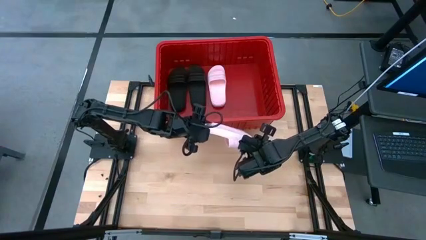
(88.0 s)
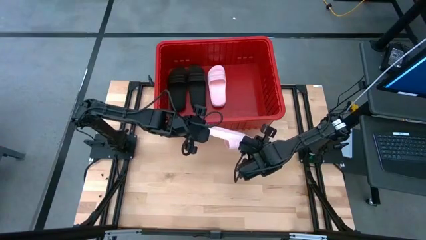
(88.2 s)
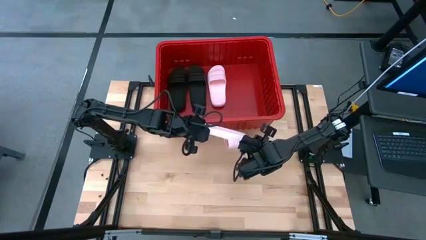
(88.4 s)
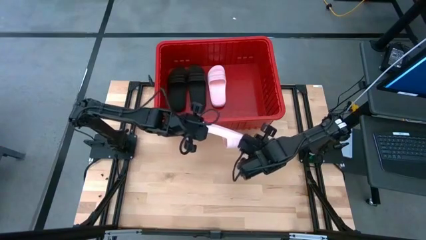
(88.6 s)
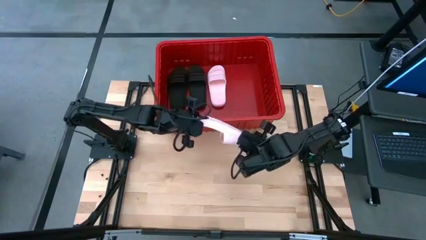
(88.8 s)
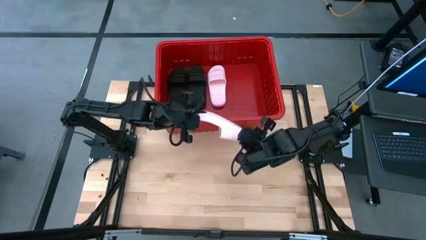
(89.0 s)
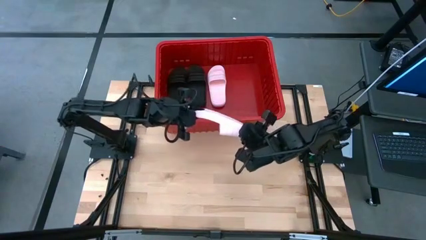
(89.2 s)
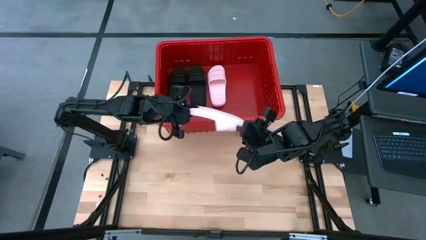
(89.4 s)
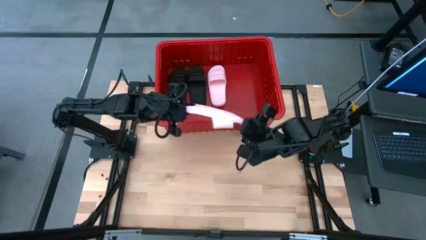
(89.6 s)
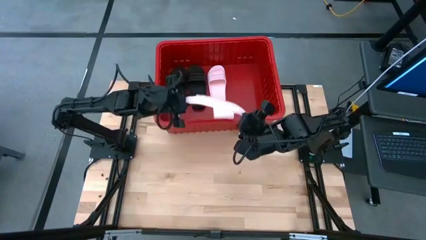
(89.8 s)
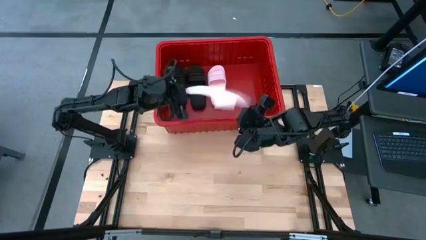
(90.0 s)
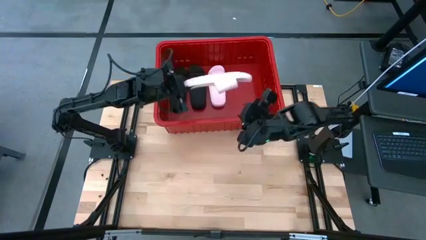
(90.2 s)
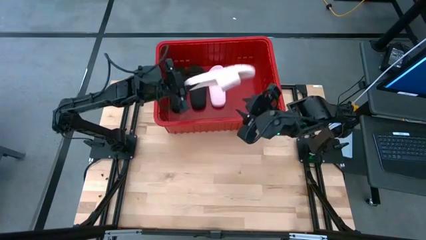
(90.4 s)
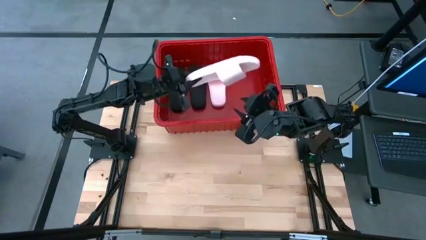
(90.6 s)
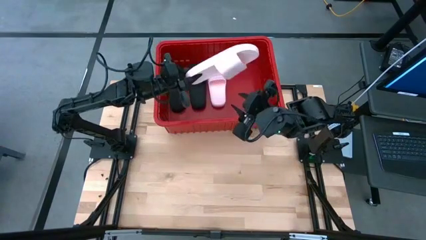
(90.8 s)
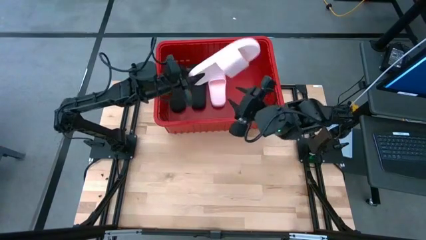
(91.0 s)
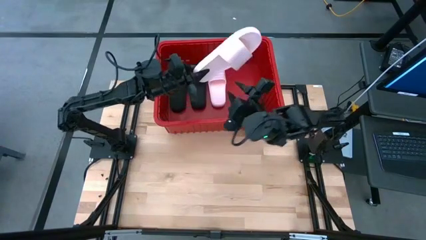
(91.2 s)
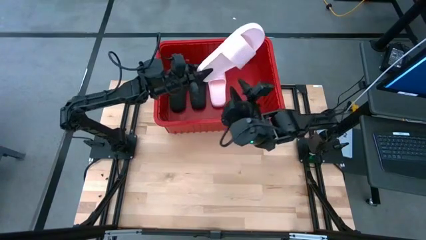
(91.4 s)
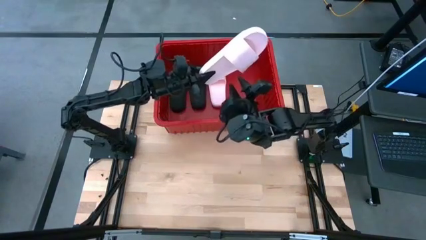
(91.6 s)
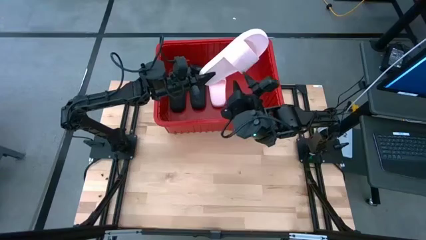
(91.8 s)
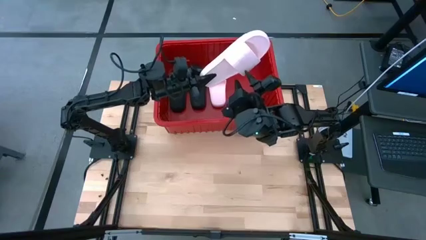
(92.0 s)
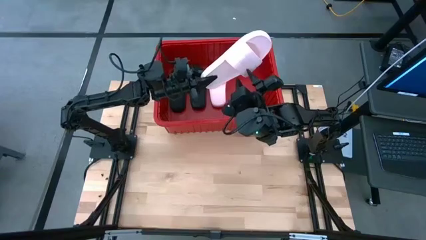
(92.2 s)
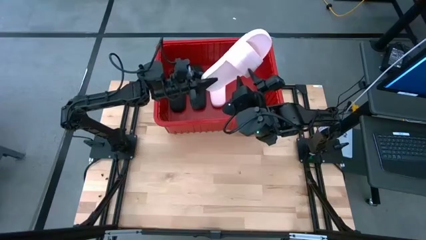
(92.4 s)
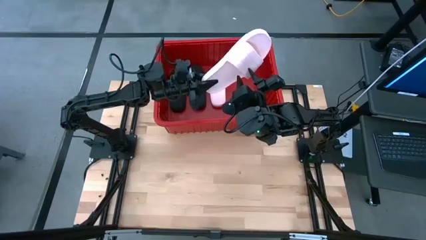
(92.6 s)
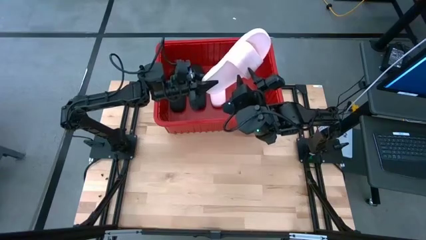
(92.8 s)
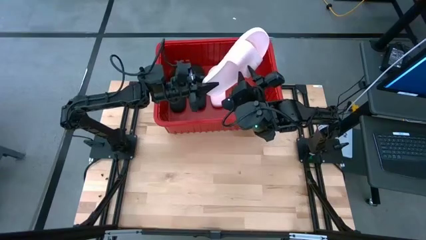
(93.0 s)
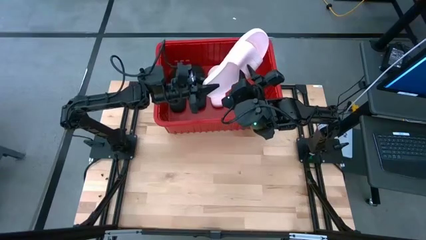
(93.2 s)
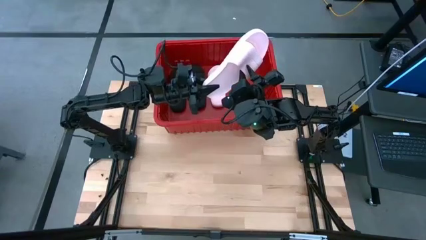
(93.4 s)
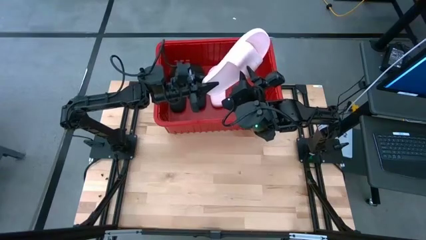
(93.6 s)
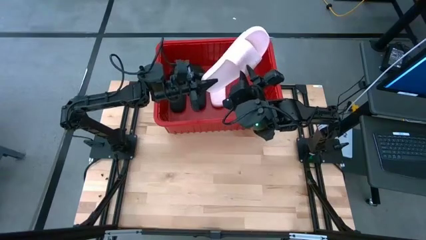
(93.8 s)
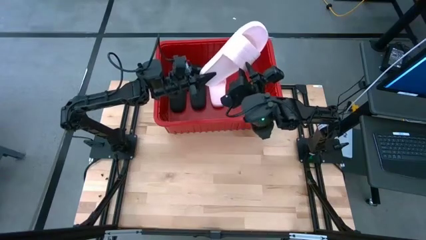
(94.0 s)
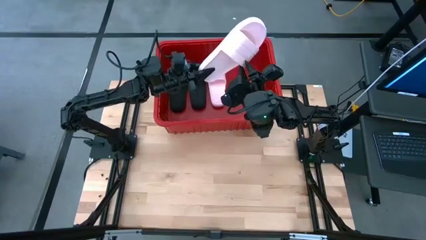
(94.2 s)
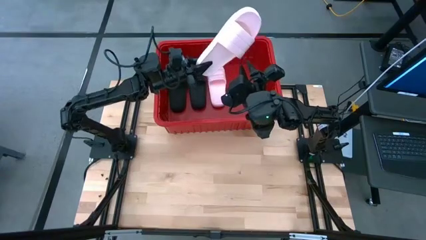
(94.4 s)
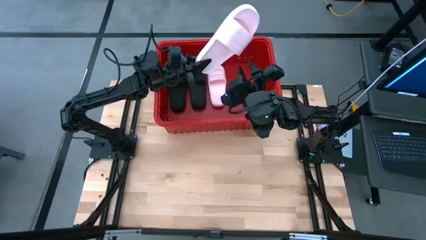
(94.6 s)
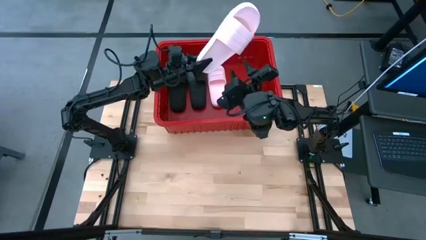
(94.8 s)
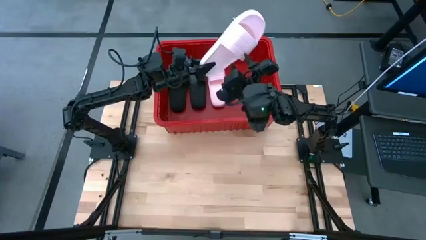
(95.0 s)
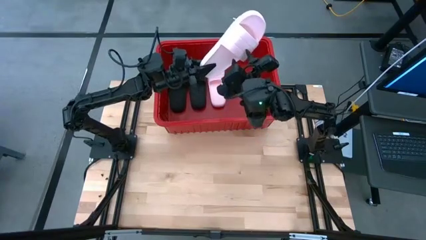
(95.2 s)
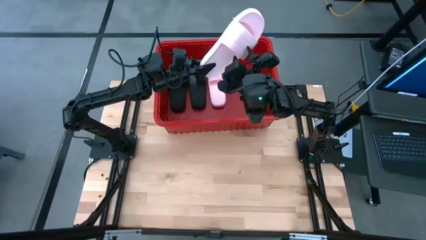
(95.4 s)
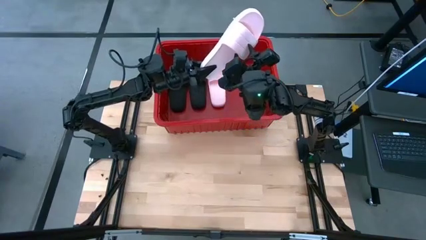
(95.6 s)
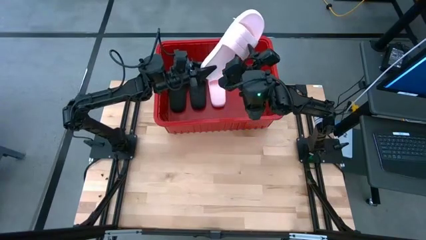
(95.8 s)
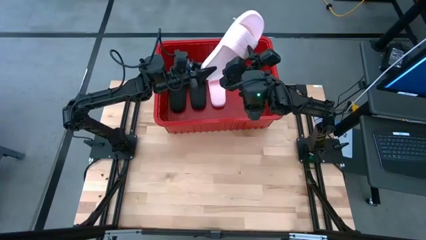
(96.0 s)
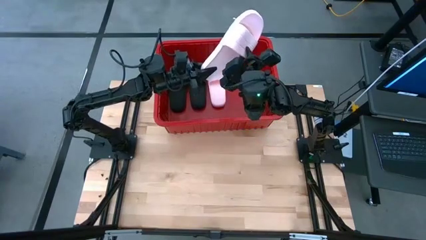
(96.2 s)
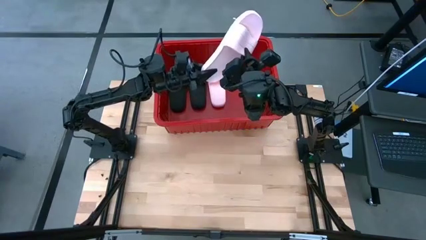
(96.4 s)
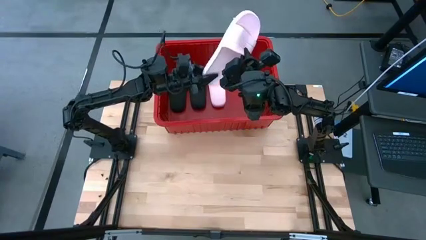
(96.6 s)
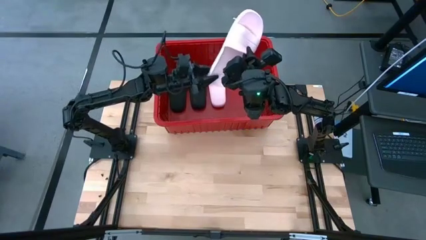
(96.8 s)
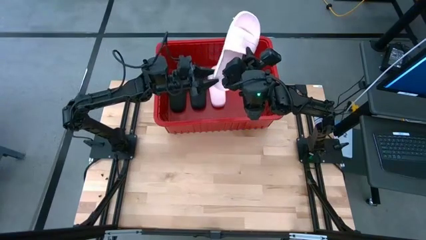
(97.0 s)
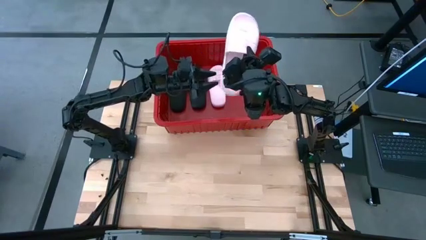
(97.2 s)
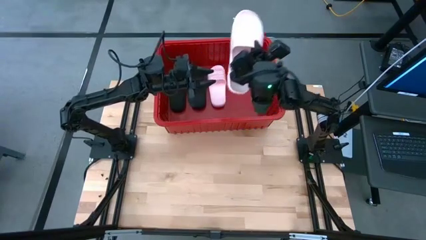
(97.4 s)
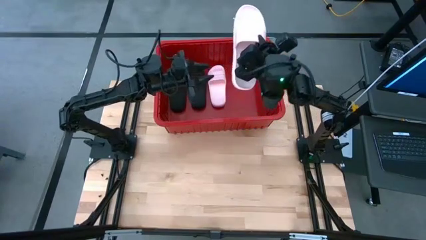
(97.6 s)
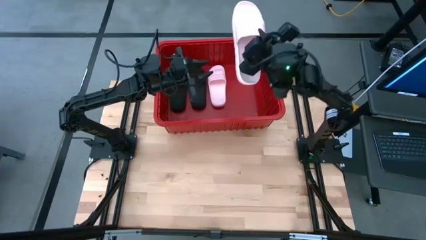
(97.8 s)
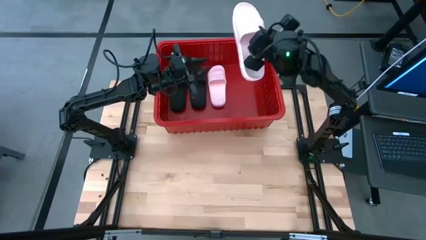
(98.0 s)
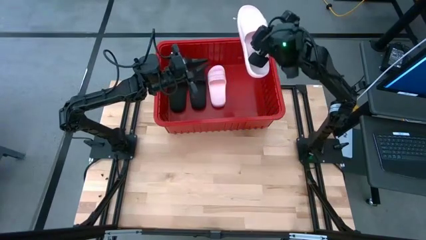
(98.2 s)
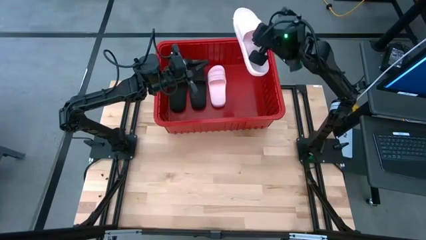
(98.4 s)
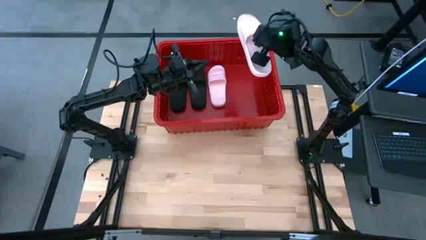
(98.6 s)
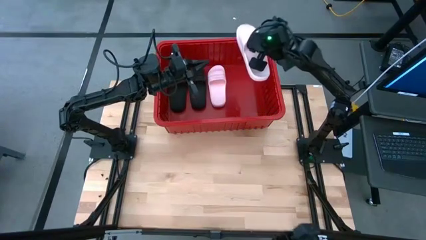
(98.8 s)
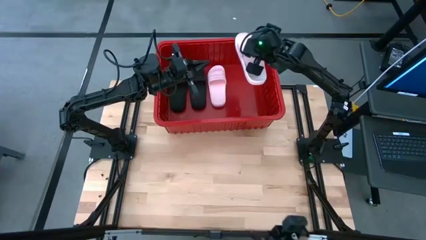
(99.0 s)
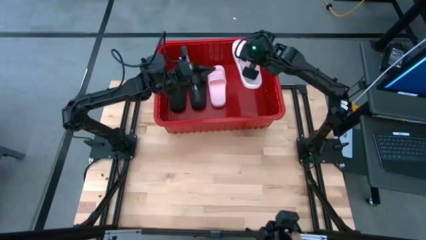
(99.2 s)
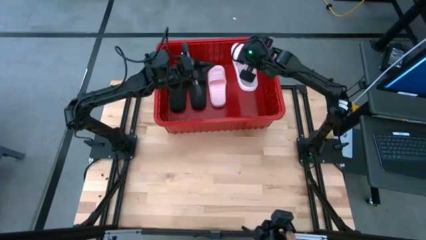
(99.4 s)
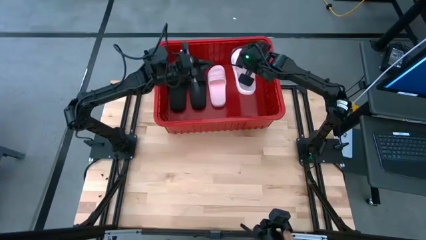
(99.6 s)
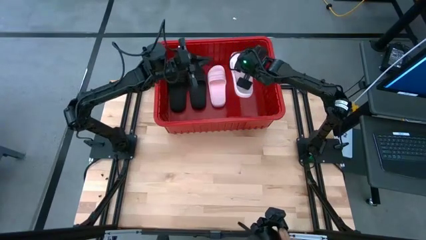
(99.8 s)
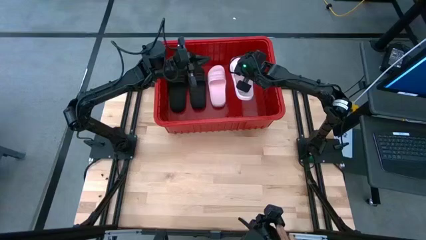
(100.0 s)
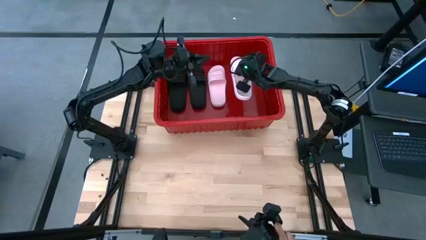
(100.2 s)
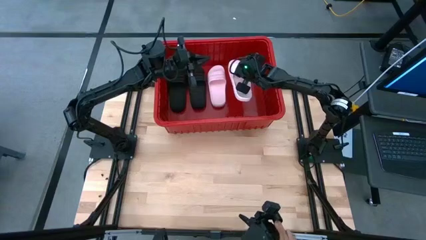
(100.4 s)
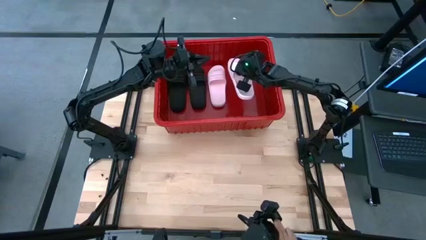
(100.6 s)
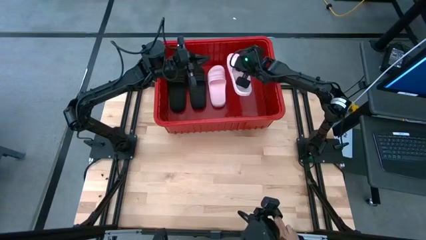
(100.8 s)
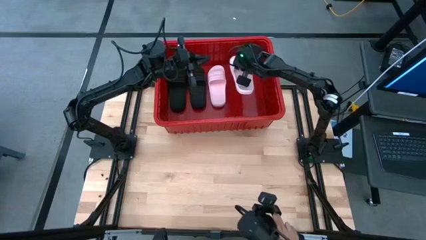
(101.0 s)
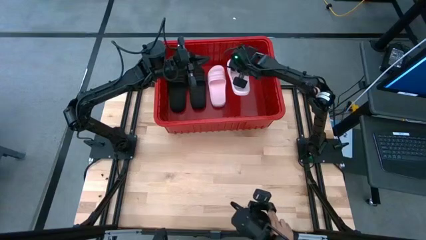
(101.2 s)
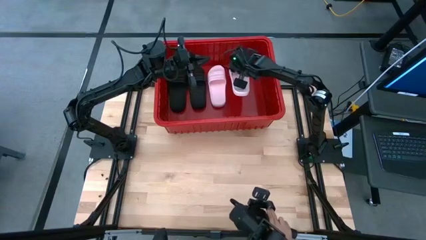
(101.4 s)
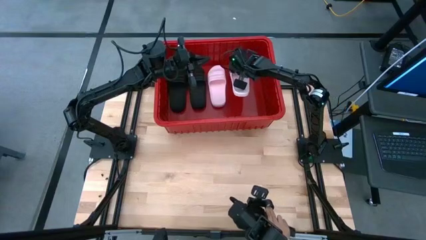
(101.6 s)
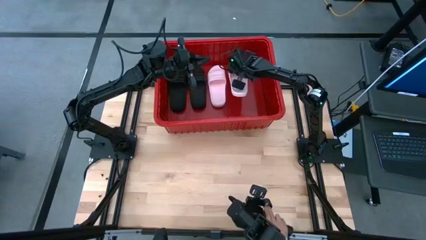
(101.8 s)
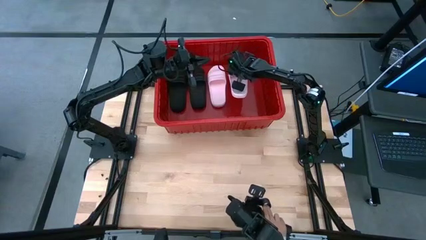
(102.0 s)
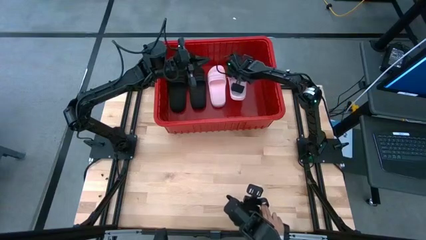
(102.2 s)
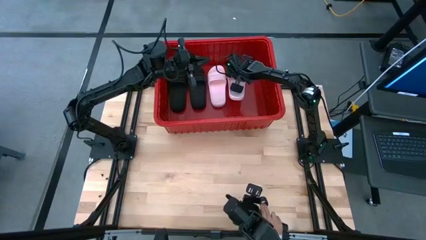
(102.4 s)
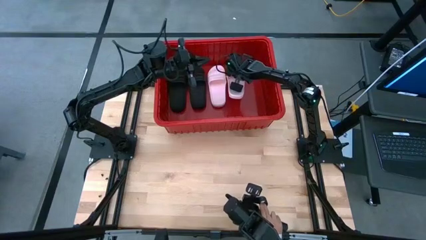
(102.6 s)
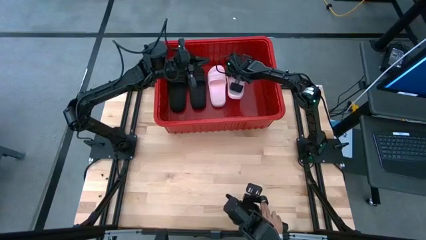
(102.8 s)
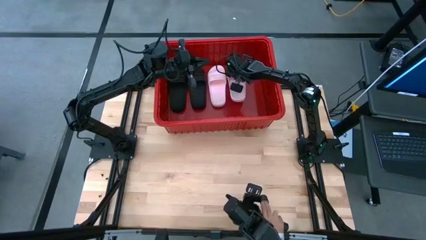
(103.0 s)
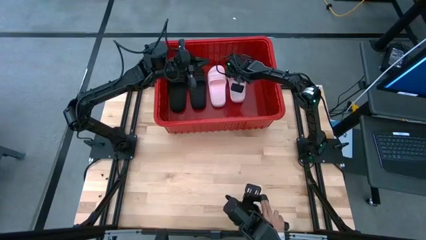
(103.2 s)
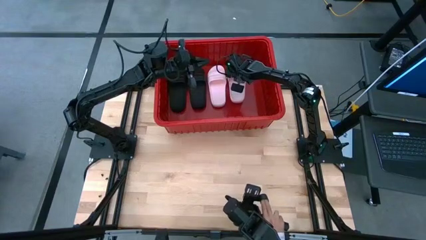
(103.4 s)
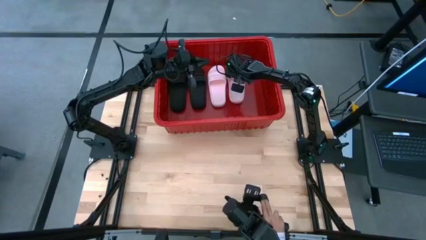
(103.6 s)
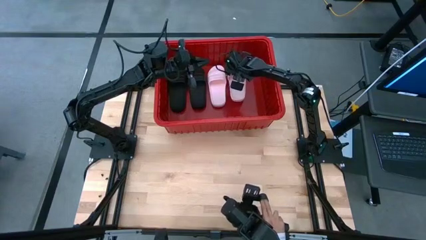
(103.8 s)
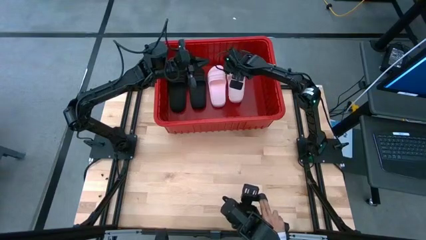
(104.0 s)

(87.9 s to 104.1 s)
Task: Pick and place slides into bin
Put the pink slipper into the red bin

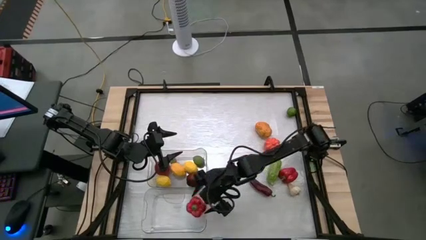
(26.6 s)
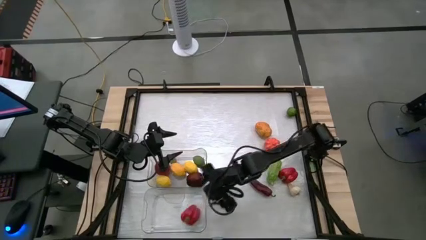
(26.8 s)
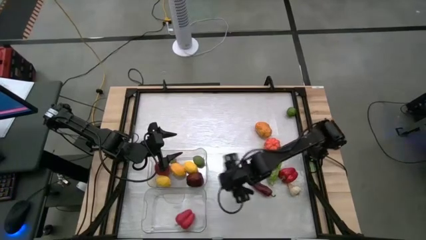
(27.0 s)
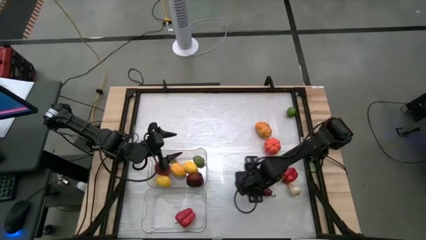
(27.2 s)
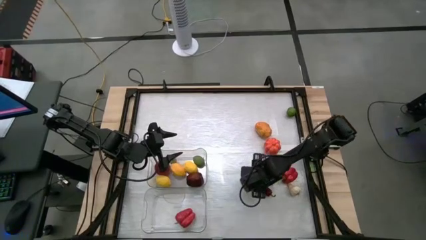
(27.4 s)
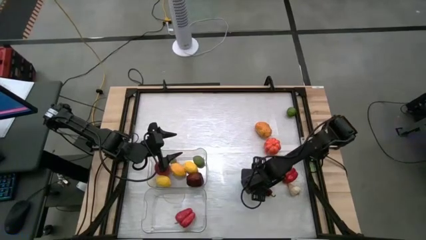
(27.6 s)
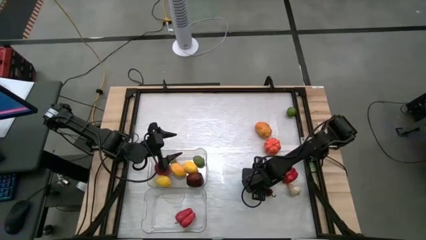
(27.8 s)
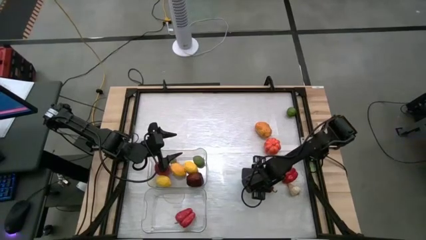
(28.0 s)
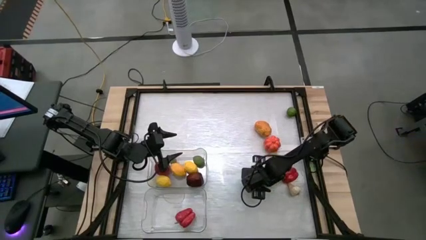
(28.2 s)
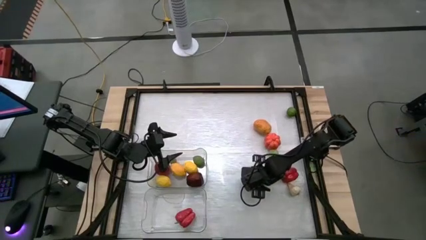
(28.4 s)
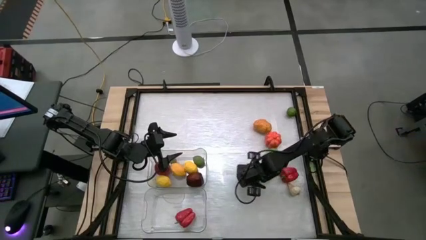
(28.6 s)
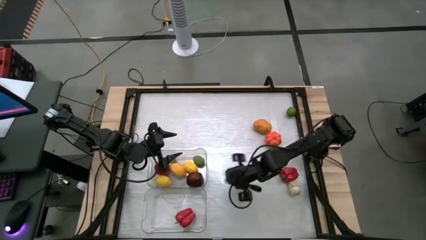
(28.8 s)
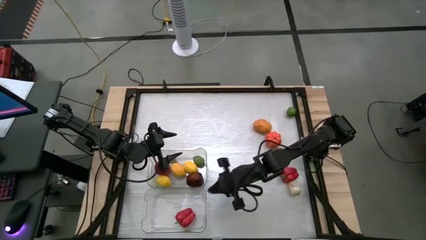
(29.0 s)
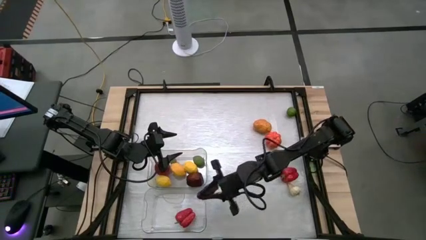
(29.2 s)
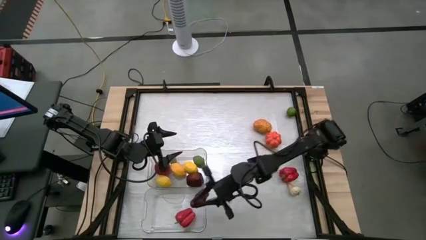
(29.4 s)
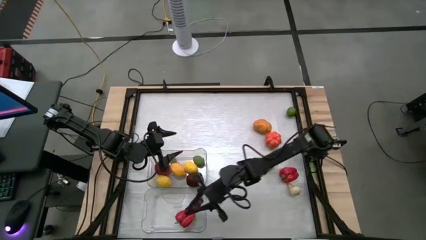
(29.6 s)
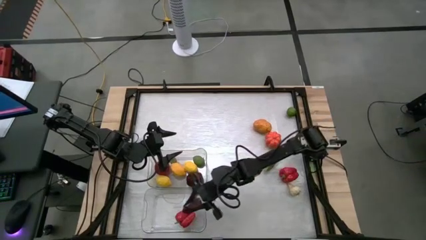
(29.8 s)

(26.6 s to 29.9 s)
Task: Sort produce into baskets
Put the eggplant into the bottom transparent bin
